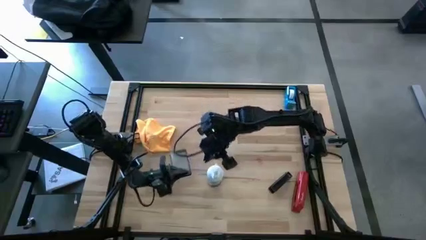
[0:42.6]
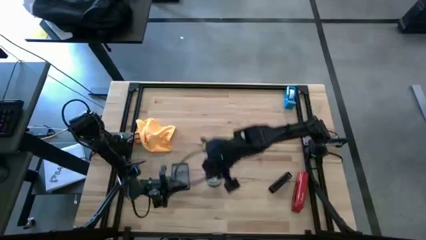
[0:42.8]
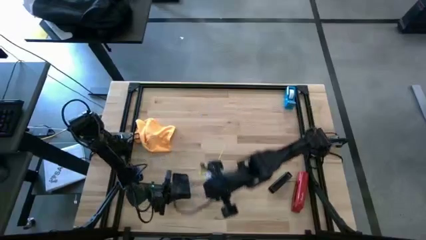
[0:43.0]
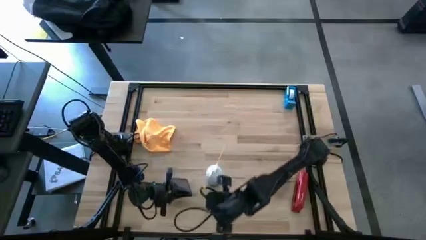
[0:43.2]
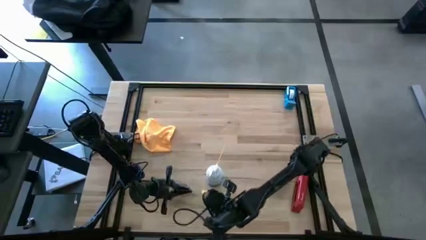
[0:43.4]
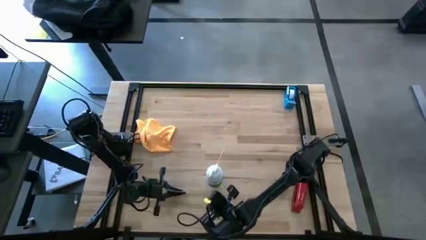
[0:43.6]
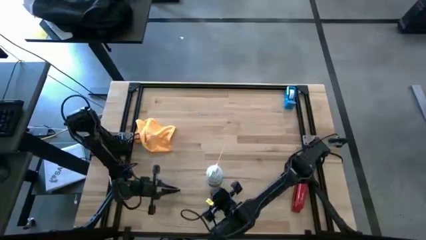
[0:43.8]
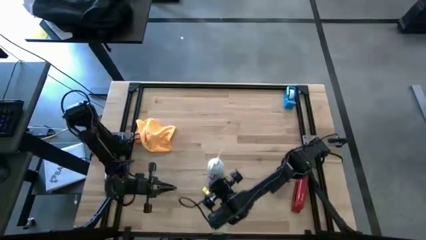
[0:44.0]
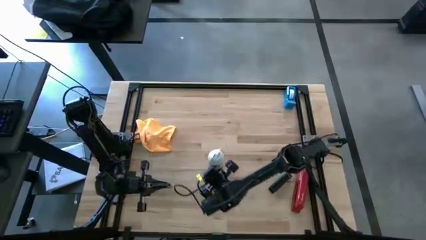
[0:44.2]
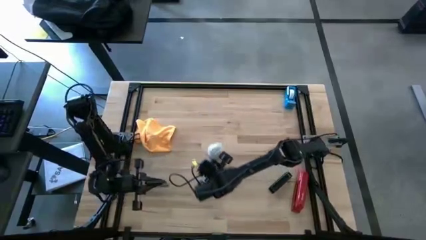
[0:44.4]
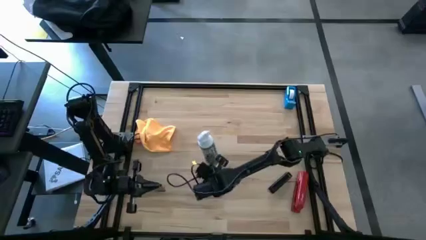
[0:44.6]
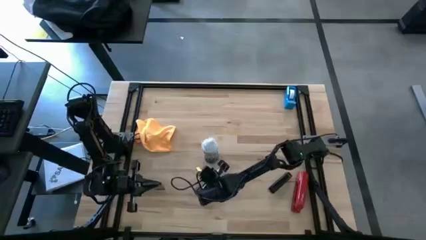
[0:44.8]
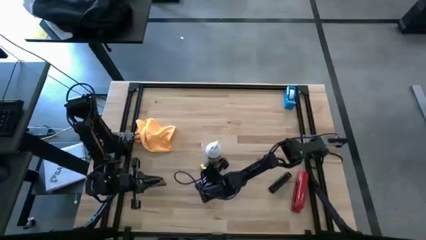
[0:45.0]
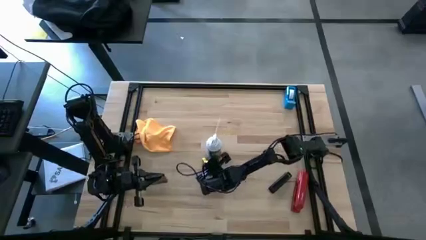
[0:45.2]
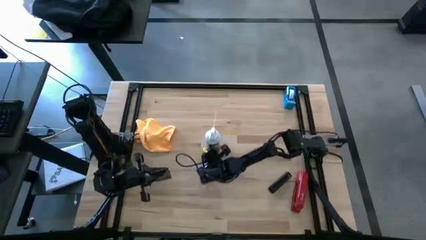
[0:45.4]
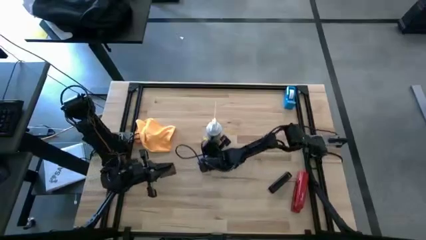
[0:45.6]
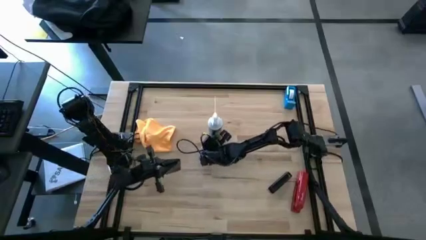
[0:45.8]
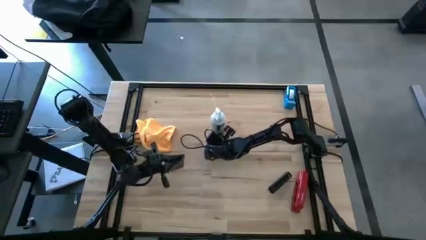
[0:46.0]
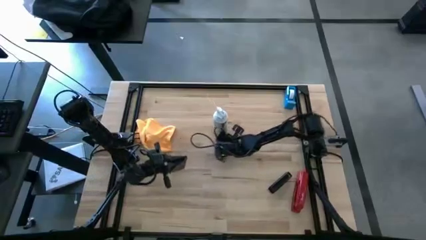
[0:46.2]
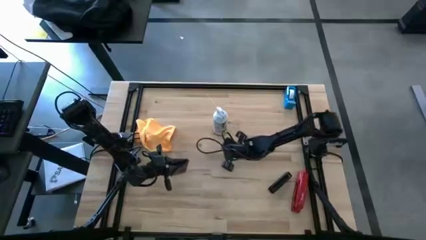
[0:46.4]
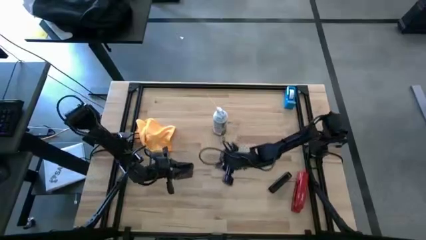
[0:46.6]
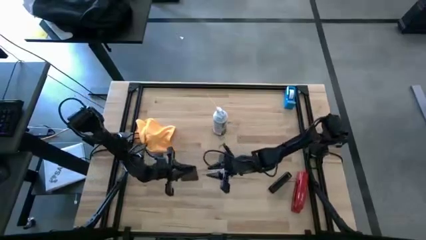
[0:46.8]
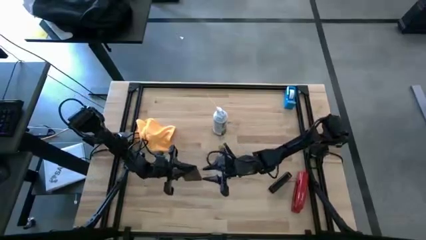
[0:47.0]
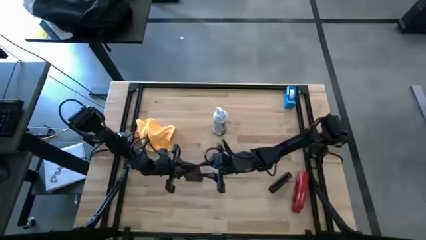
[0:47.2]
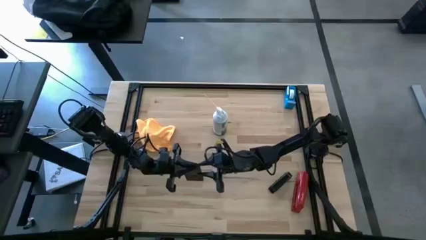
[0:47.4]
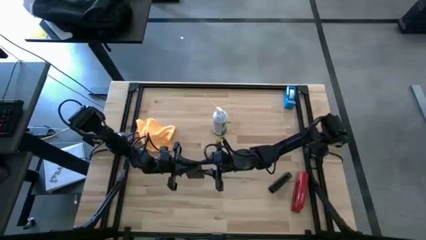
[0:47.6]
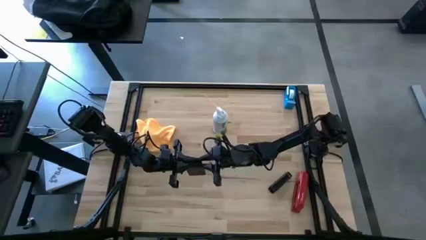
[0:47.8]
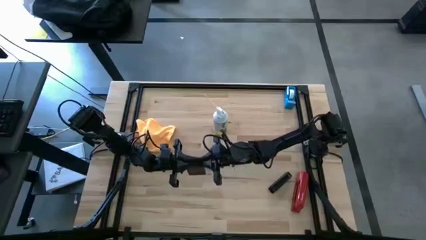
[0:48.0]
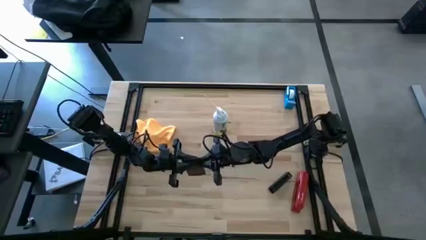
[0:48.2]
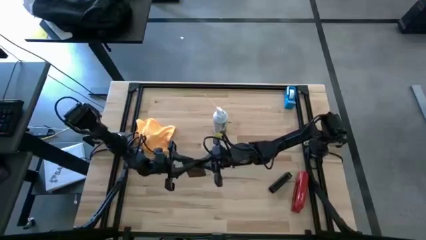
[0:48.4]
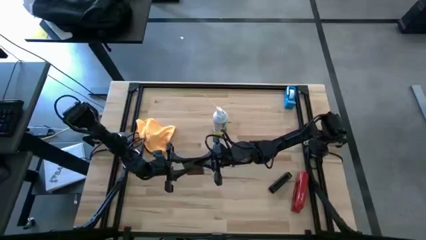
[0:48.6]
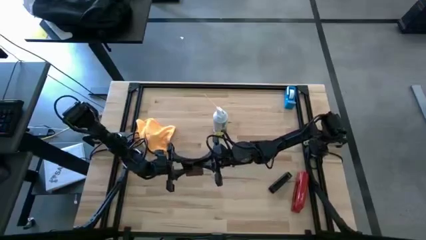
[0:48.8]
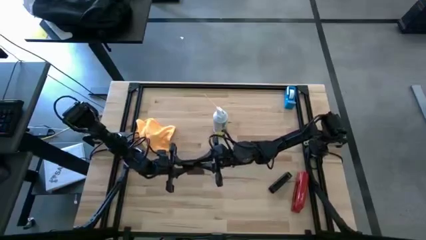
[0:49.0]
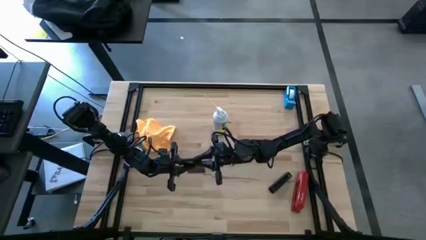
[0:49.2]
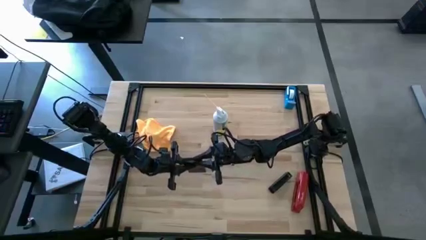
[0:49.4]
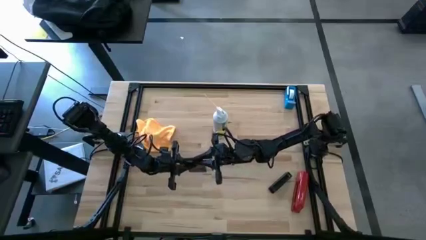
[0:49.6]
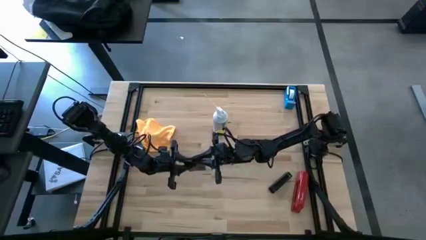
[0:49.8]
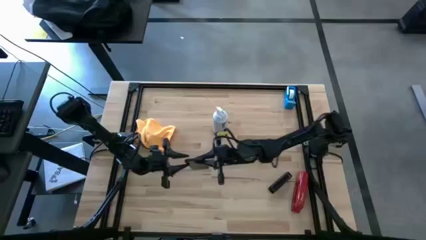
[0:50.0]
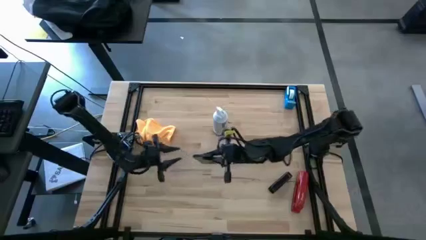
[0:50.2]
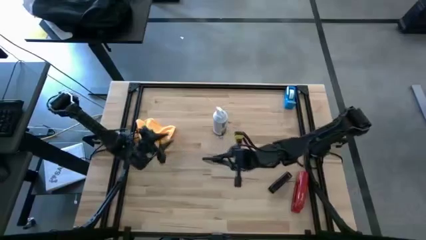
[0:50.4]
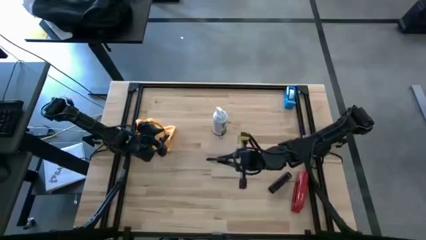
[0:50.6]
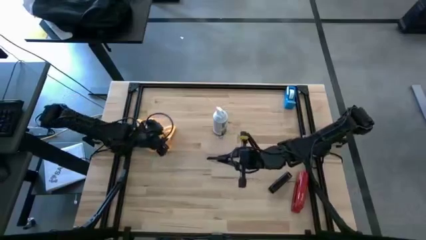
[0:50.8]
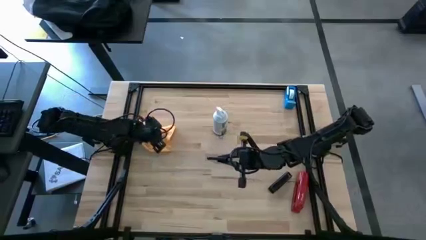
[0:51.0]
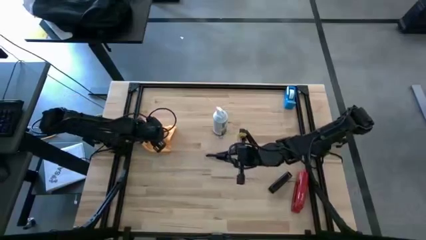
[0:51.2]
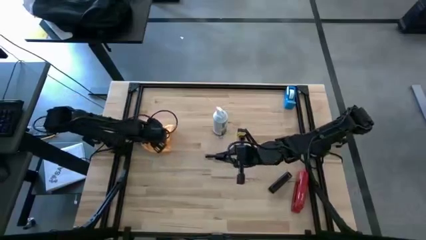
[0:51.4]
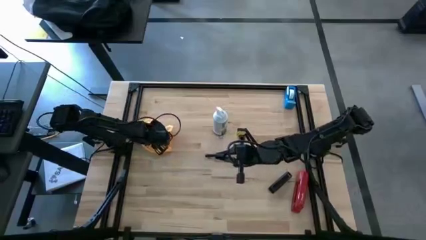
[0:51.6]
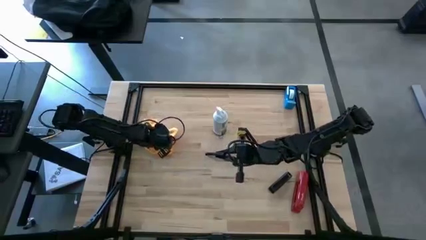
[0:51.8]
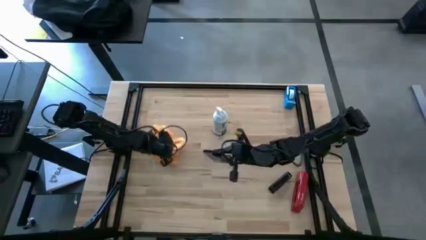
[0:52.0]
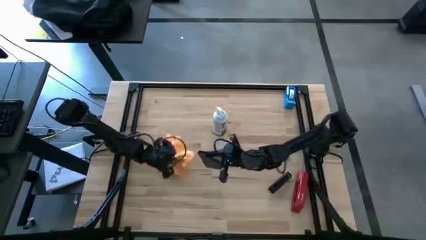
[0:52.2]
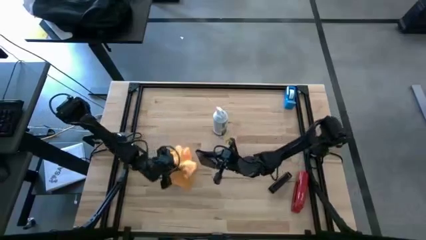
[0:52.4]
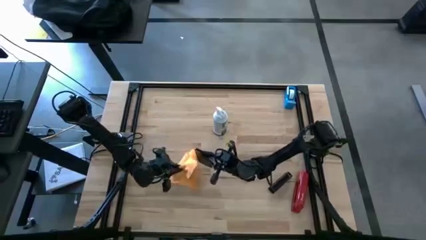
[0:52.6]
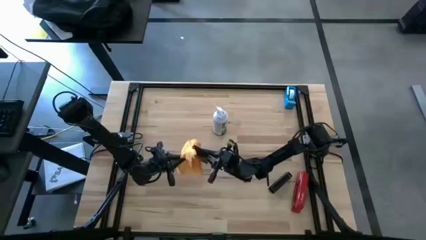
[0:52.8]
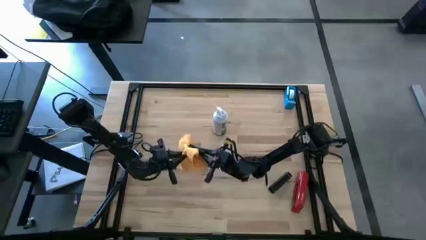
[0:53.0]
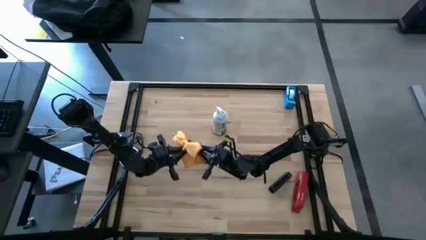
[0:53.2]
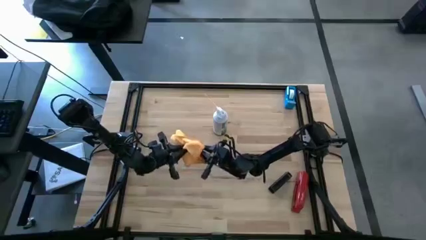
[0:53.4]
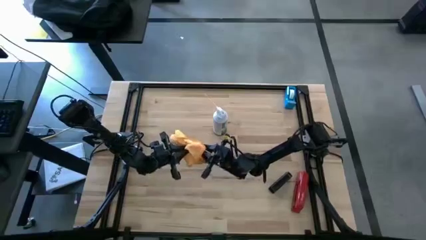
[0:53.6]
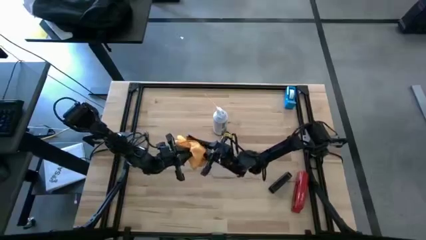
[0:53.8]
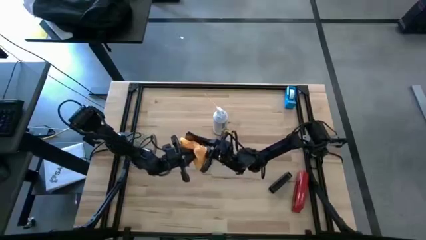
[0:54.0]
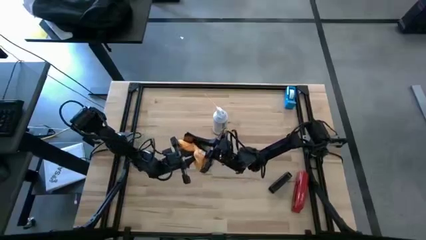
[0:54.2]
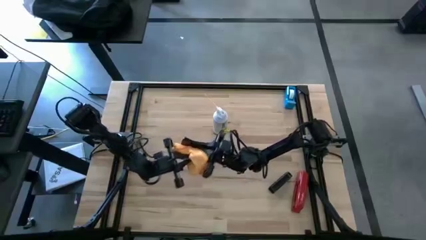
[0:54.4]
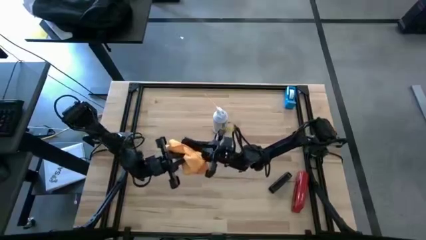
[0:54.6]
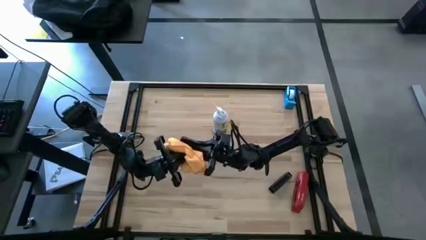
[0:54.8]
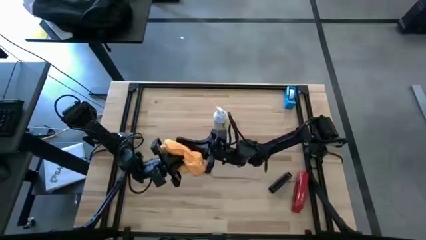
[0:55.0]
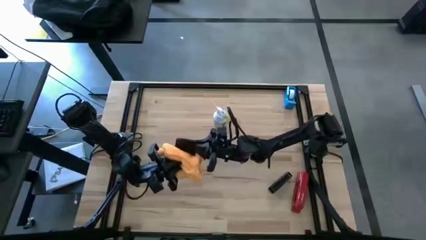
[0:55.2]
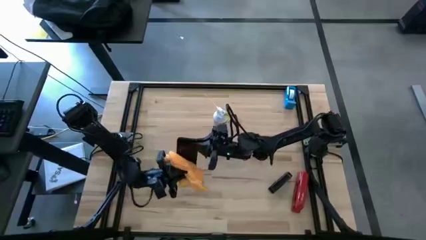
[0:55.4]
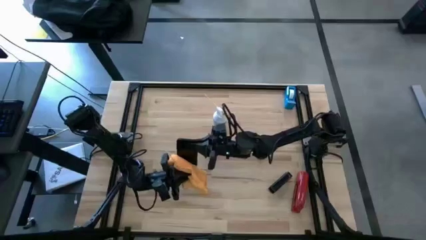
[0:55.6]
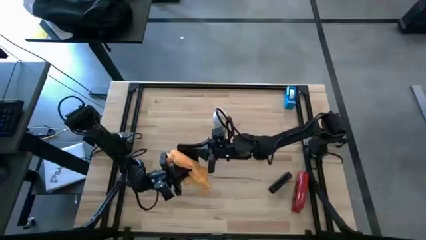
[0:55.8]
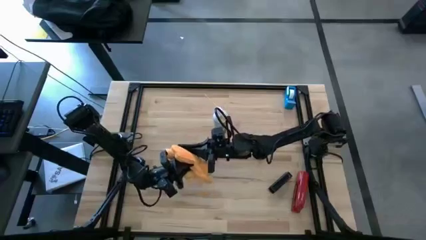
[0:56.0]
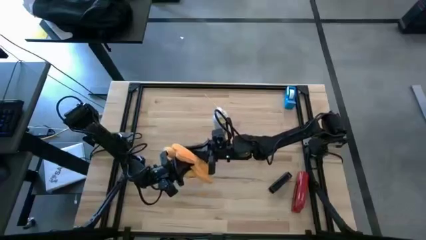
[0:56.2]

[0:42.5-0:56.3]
Task: Apply microfiber cloth
Wipe the back of the cellphone with the yellow microfiber cloth
